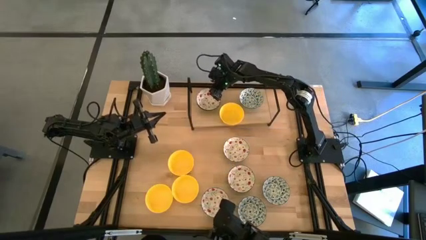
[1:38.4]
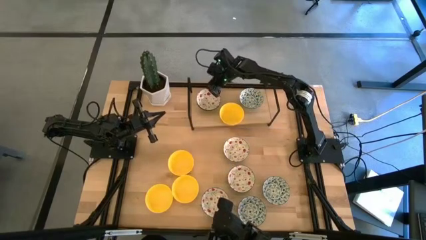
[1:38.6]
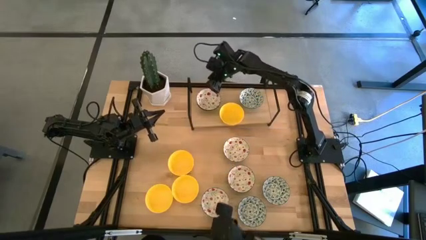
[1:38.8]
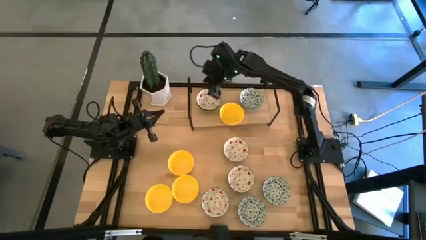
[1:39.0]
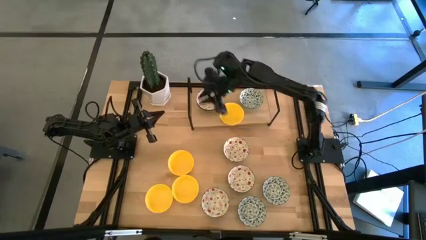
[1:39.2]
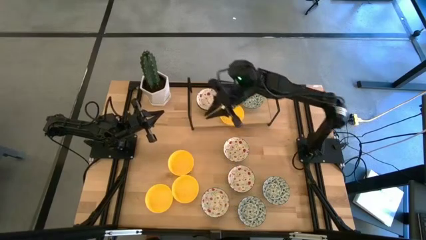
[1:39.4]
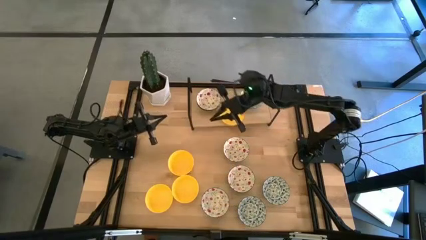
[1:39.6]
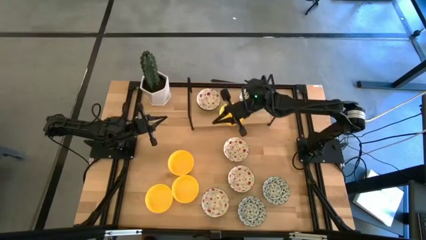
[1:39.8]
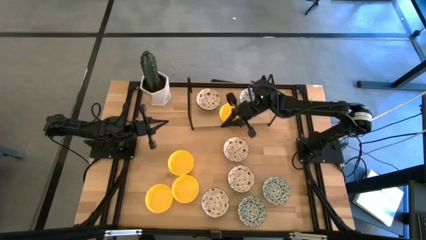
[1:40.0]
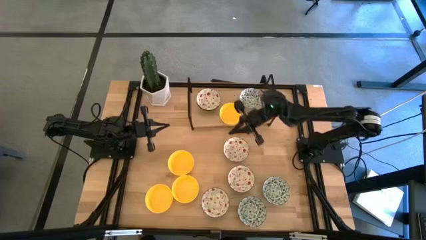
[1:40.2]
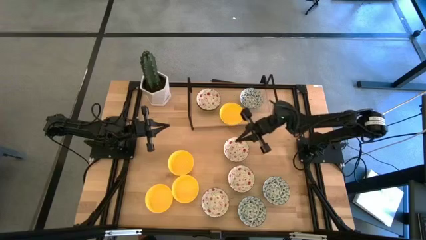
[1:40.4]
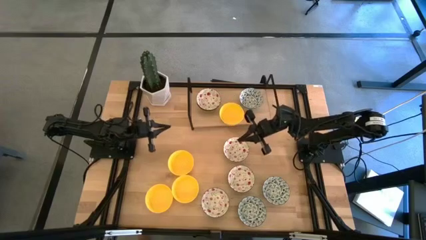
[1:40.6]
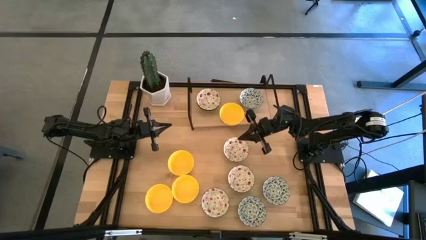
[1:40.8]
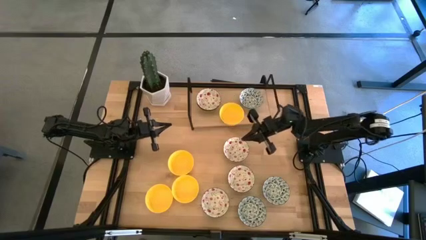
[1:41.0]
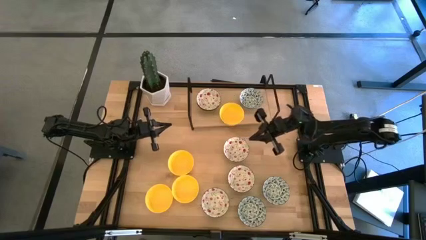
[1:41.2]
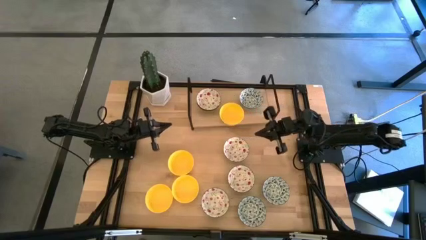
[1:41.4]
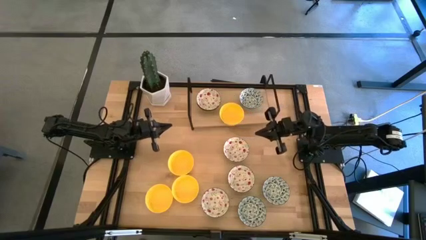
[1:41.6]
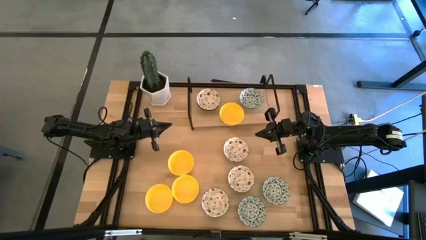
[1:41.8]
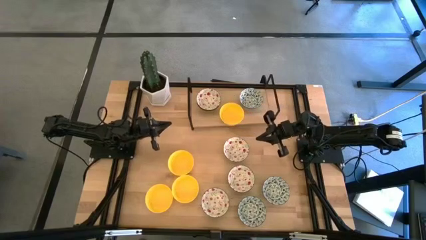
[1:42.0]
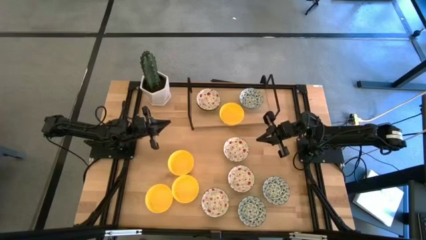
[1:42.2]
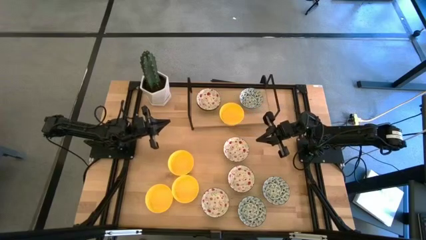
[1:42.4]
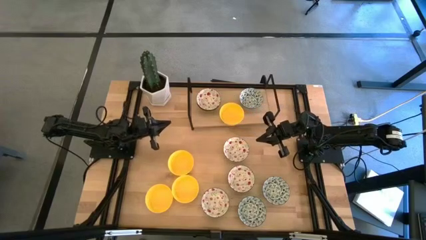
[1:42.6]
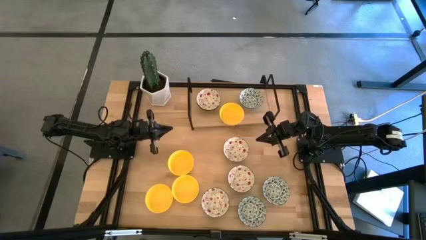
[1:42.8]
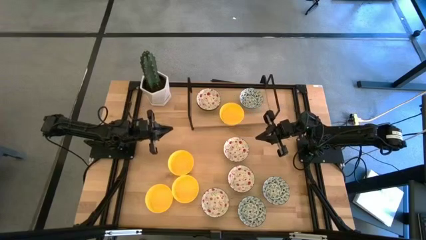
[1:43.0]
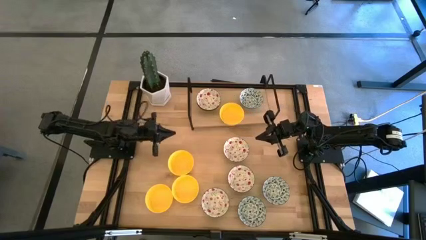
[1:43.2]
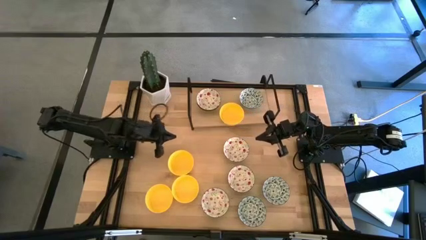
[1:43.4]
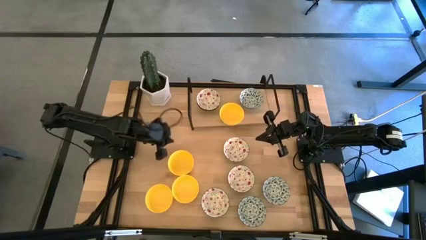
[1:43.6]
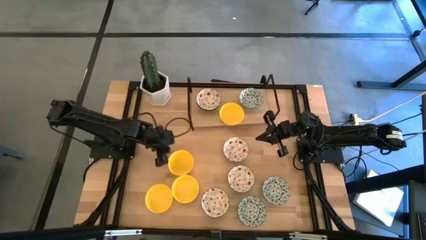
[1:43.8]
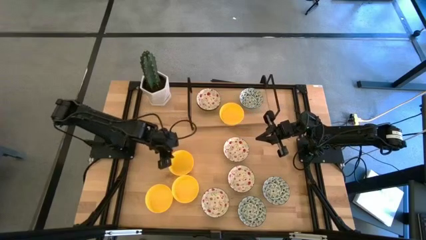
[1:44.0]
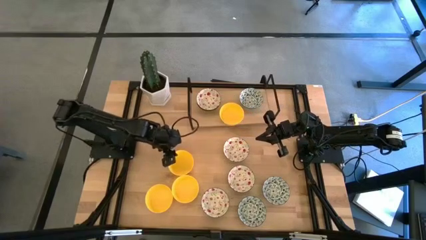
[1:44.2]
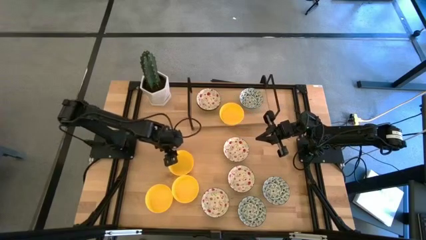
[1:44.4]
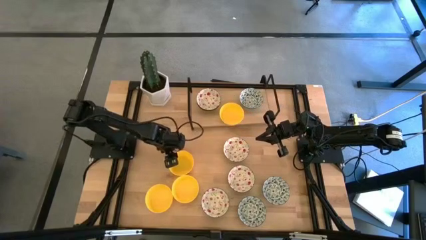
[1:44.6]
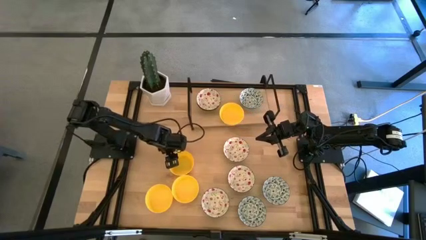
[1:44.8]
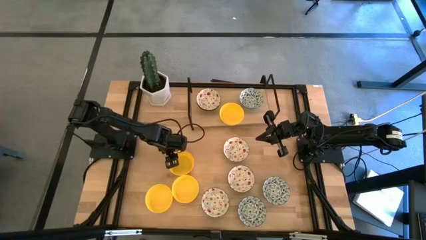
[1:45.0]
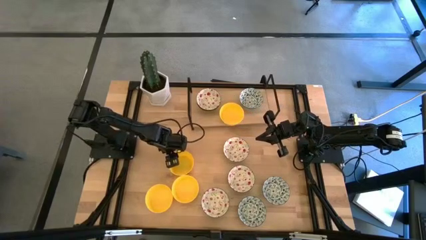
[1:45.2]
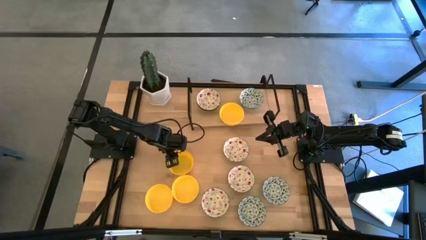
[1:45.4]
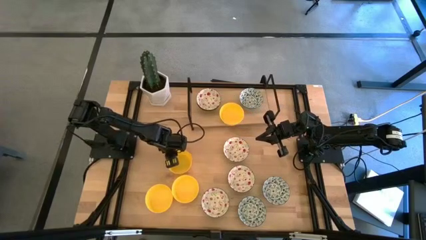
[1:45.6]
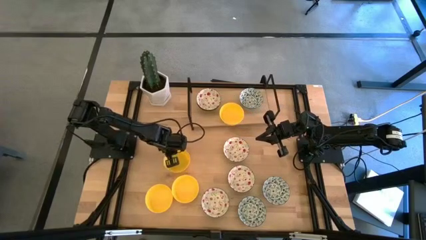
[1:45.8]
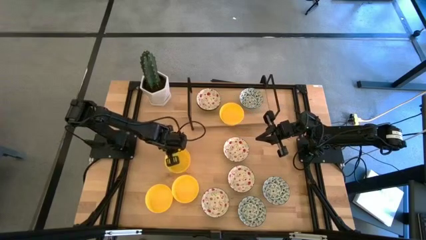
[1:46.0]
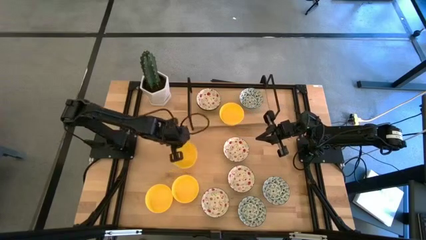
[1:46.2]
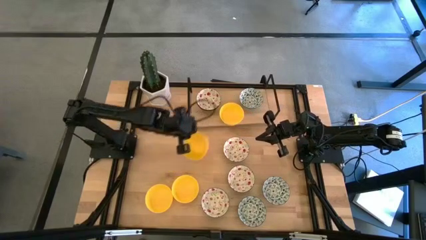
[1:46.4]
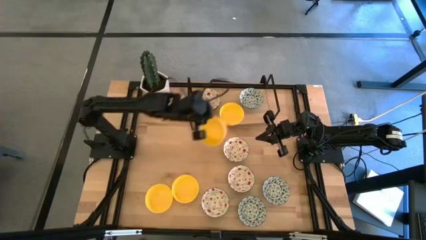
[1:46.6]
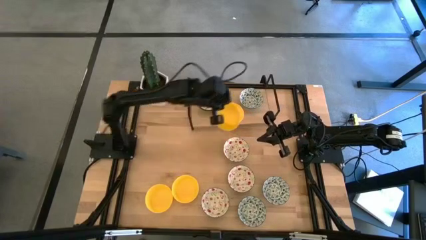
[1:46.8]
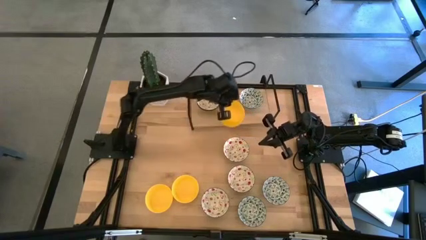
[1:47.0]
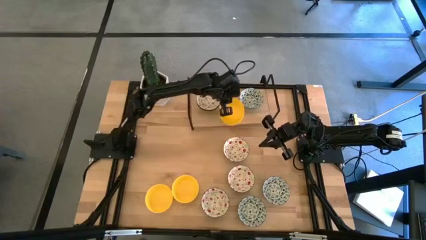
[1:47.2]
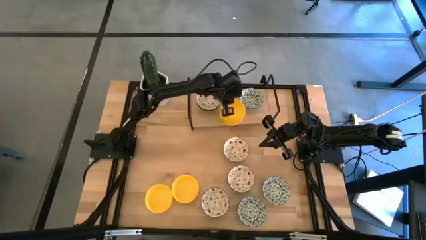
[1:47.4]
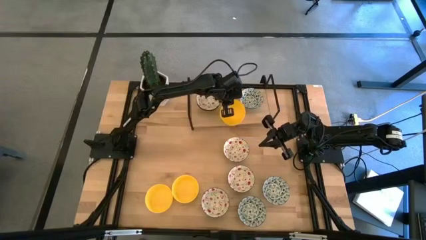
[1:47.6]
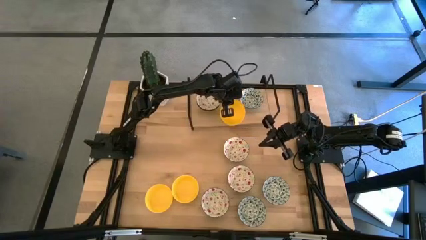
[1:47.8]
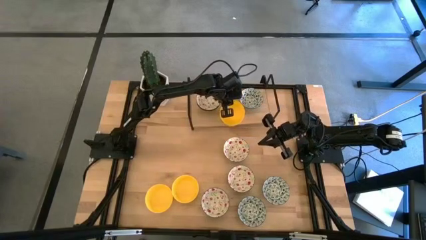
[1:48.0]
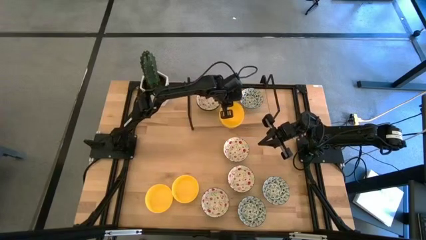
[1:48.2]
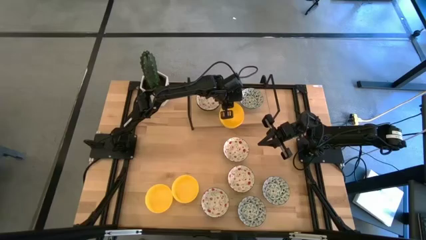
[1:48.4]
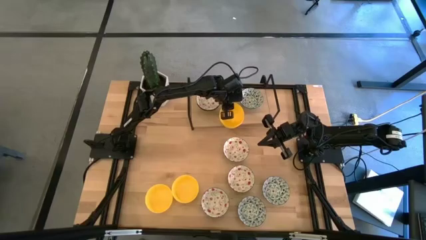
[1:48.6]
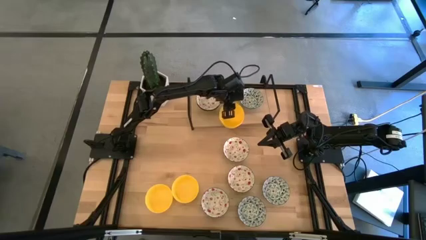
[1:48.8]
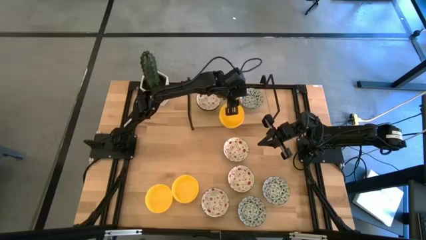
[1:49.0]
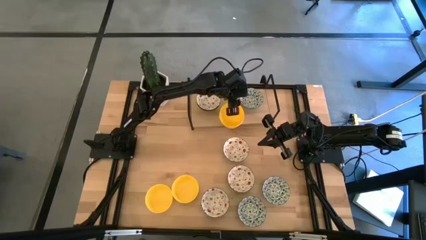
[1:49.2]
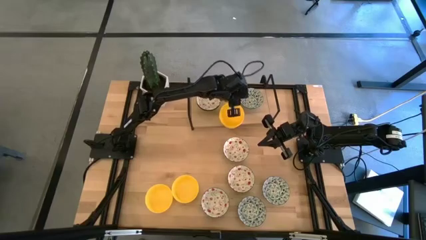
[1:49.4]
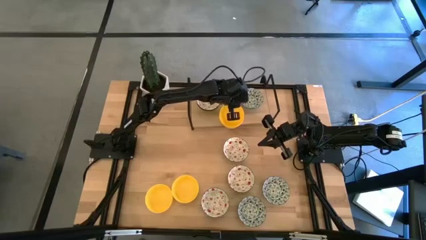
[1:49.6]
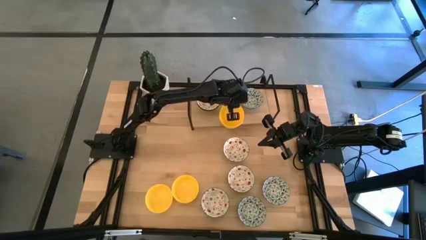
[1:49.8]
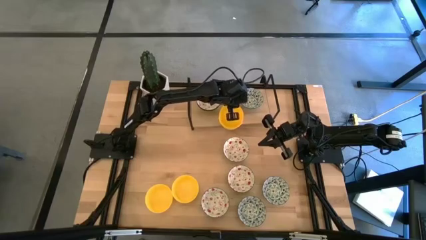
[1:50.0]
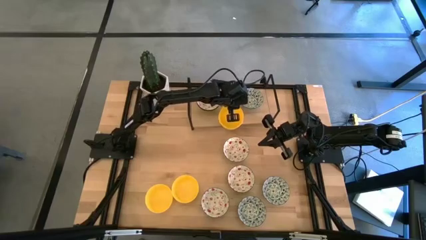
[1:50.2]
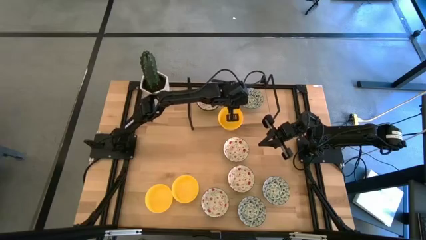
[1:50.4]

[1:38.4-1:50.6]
Task: Pick & Place Mini bowls
Stack the yellow bowl on top of the yellow bowl on the shelf
